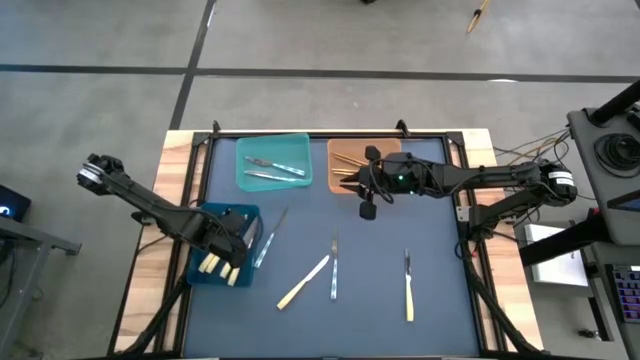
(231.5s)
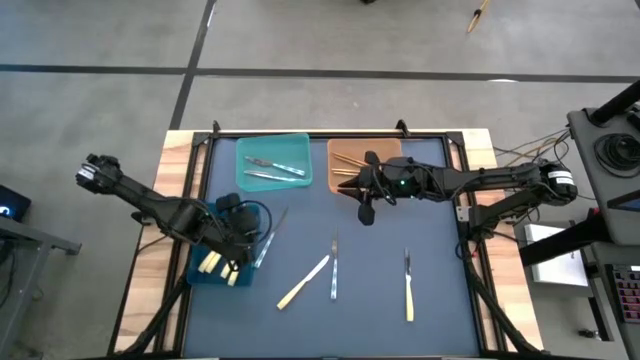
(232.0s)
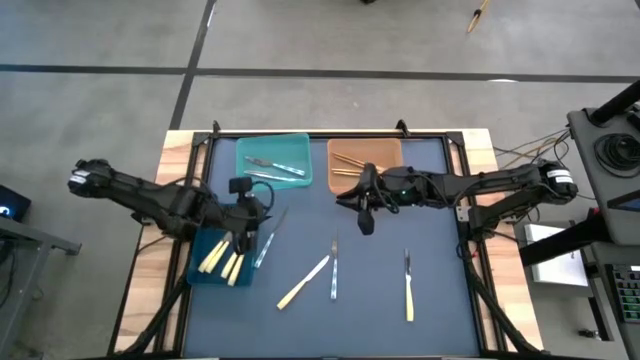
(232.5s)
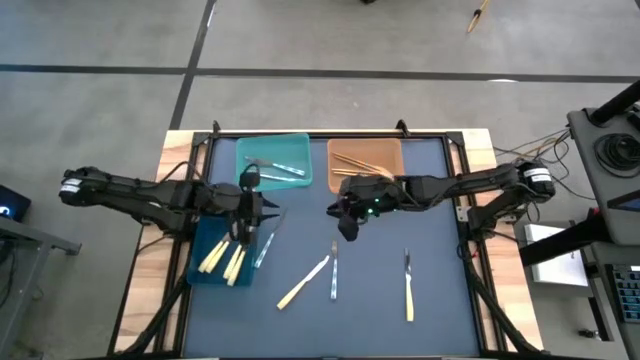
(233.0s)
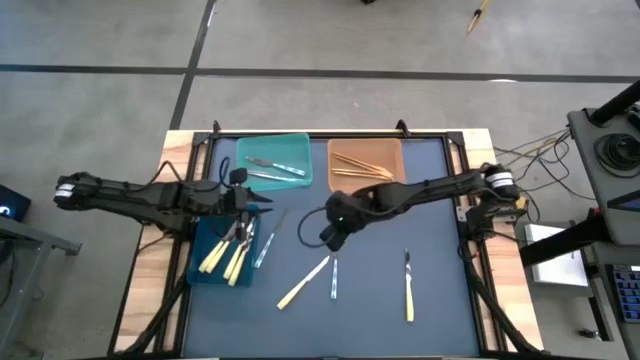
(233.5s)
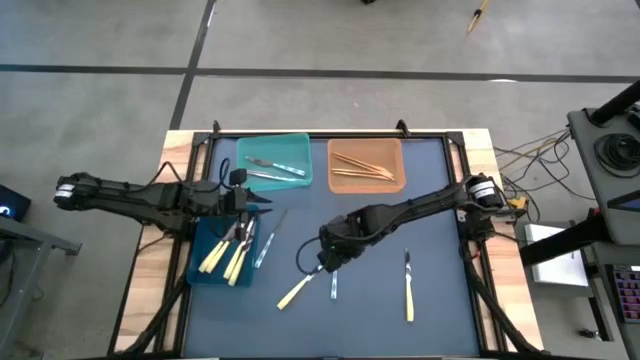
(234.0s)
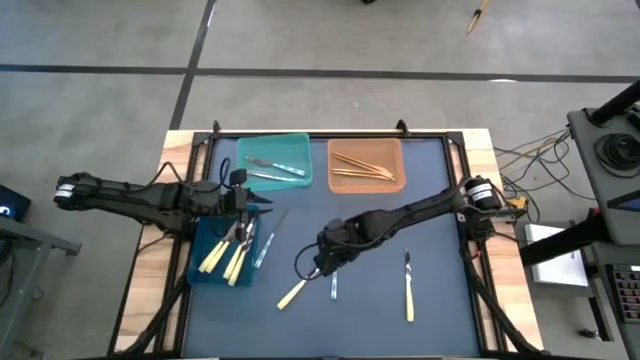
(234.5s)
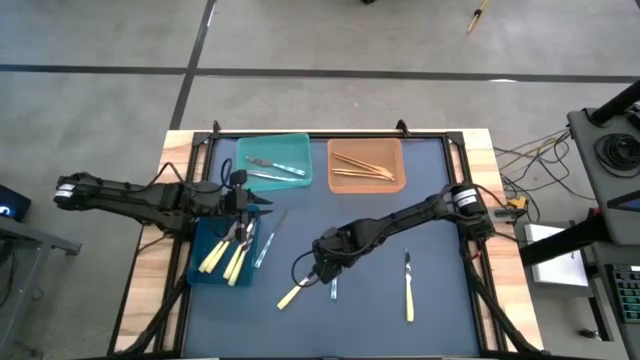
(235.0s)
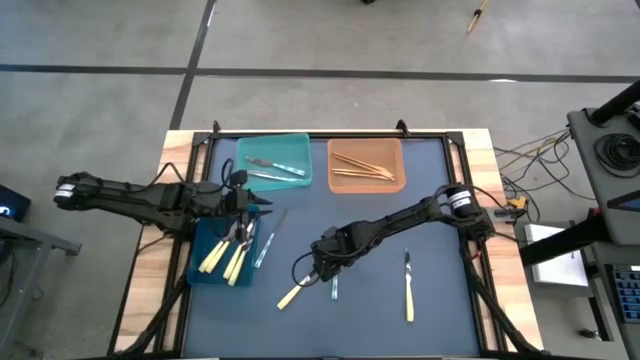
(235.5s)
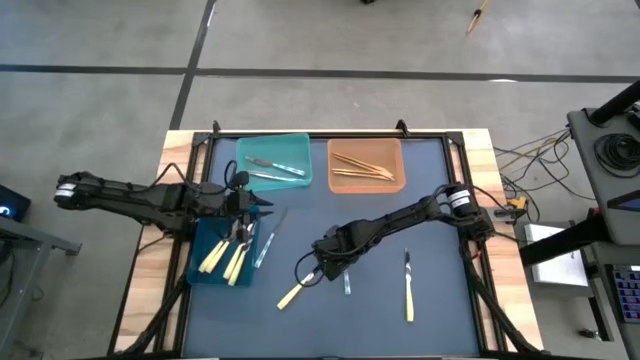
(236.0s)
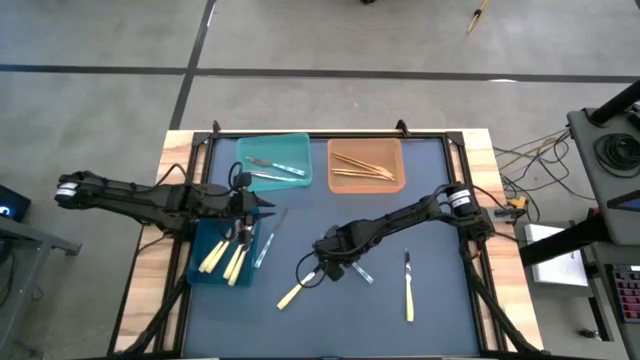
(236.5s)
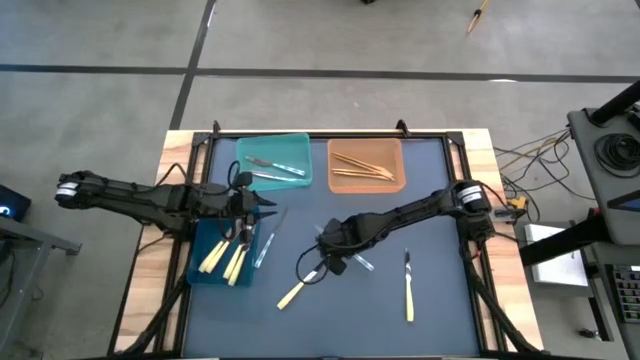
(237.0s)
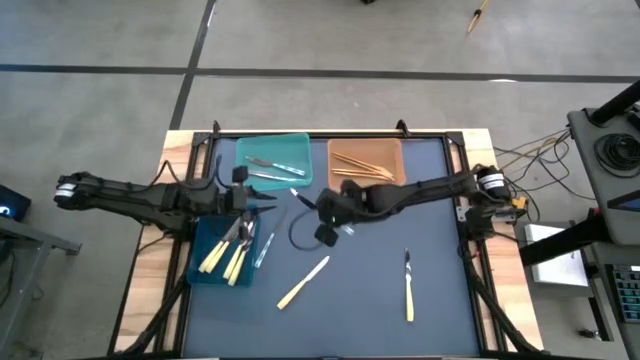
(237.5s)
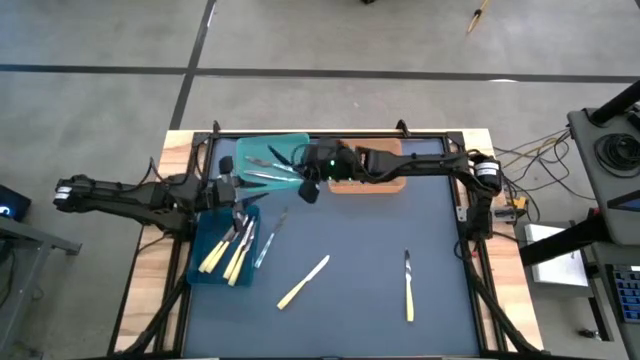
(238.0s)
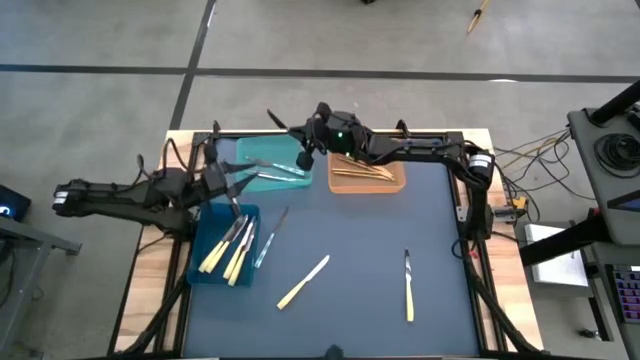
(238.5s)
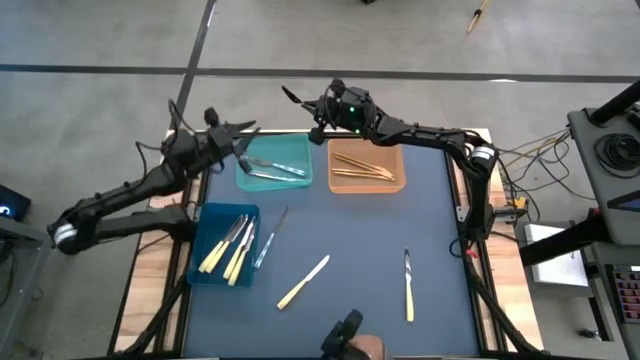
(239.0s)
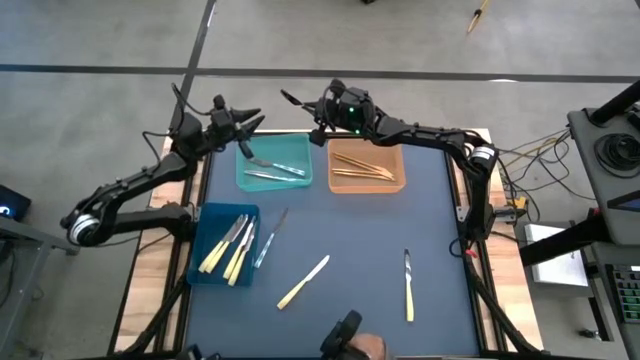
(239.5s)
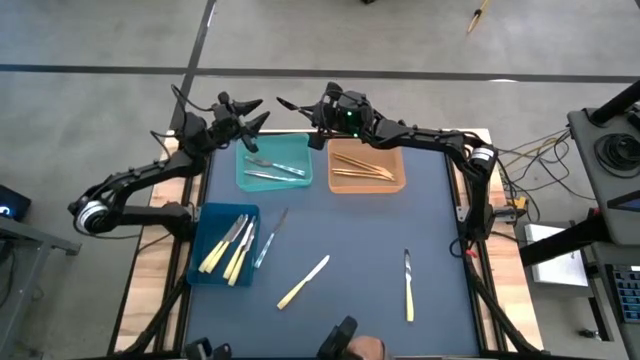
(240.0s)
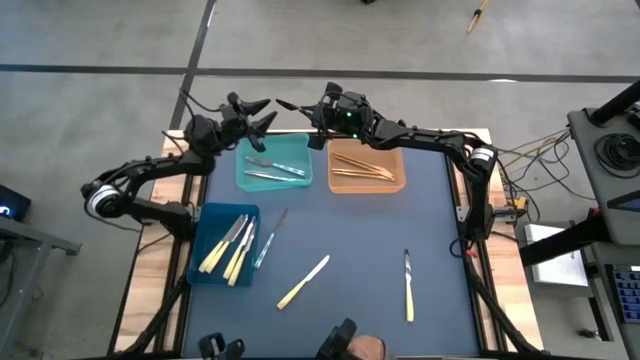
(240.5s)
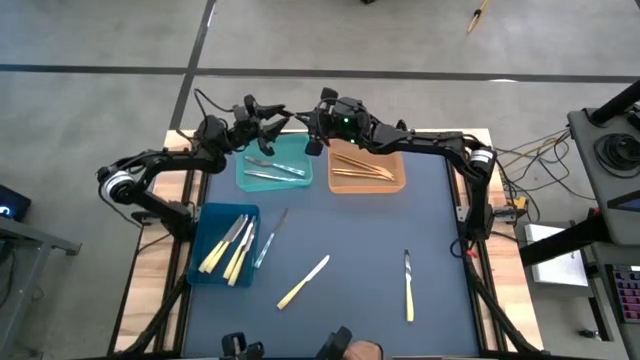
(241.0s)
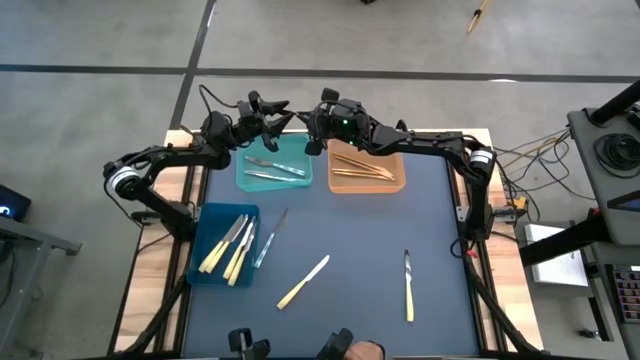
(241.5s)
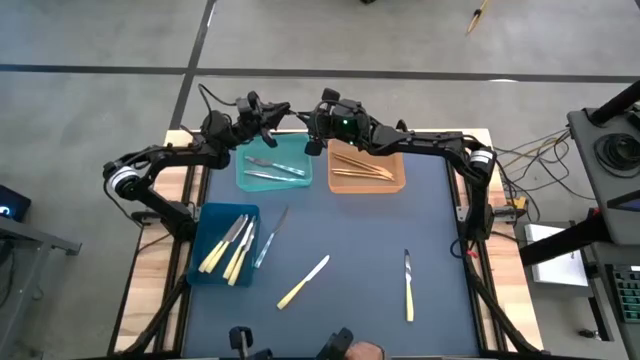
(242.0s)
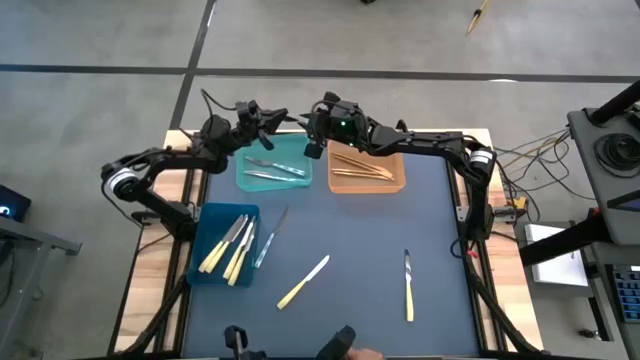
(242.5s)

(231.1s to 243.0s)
Task: Sort silverware by color (type)
Put the white knife into the light blue bin

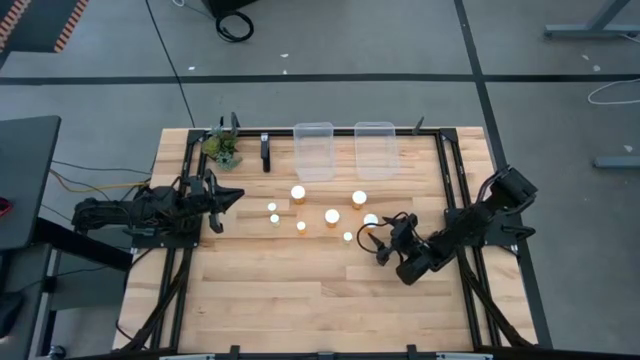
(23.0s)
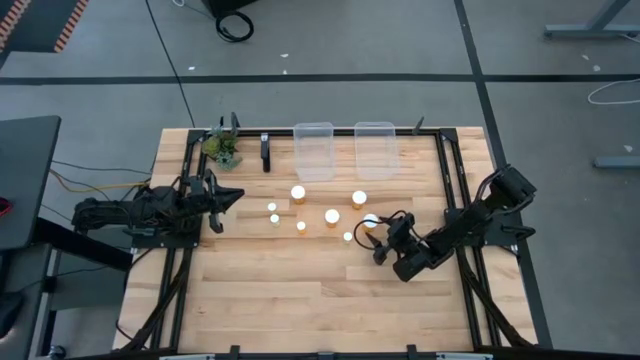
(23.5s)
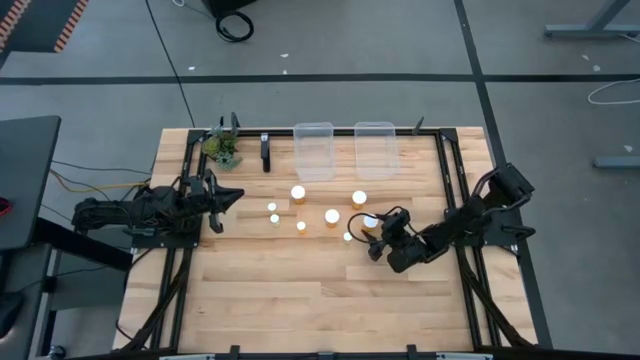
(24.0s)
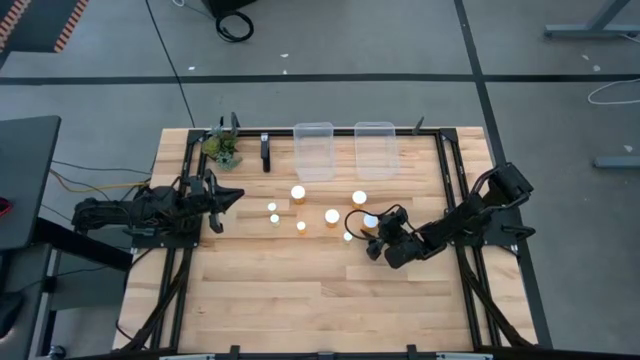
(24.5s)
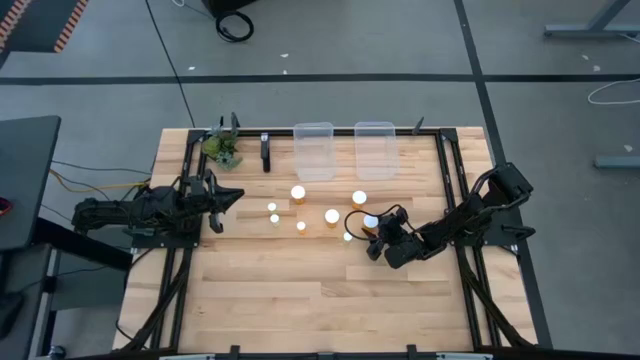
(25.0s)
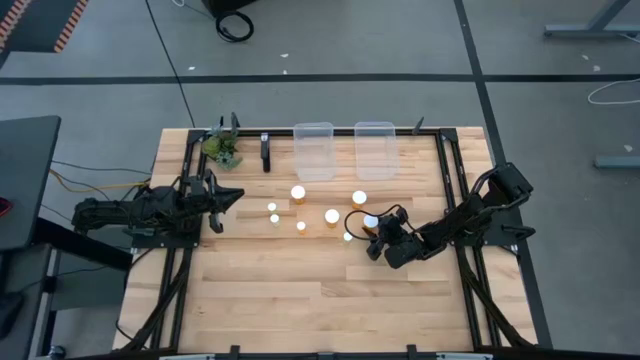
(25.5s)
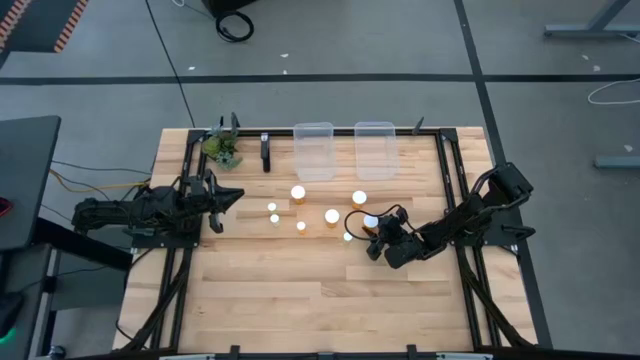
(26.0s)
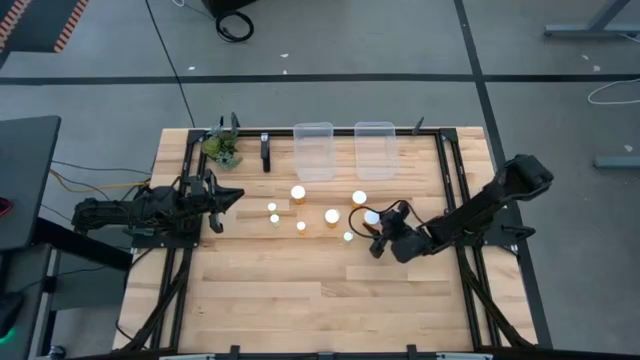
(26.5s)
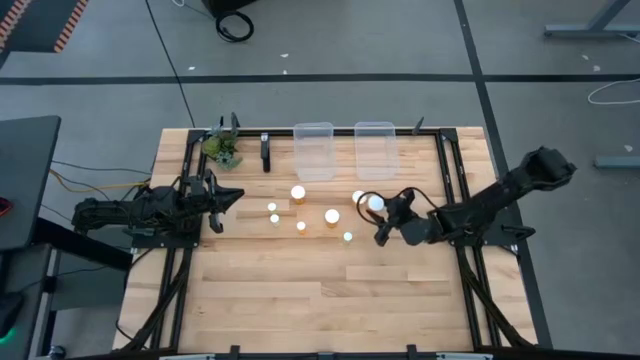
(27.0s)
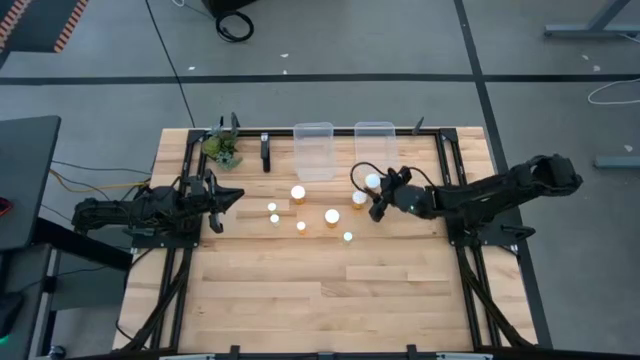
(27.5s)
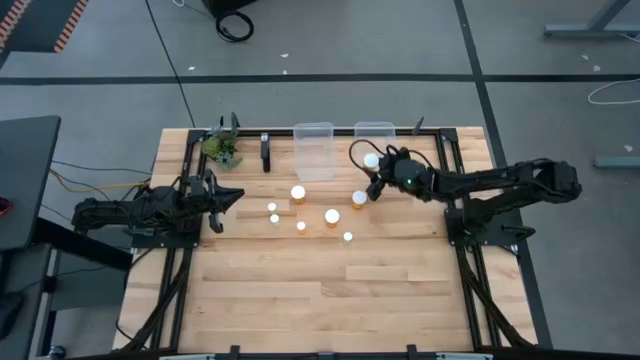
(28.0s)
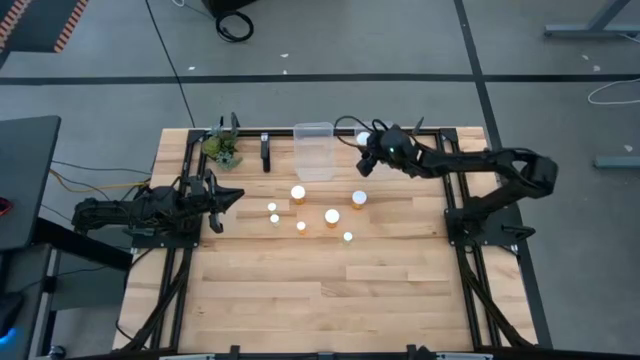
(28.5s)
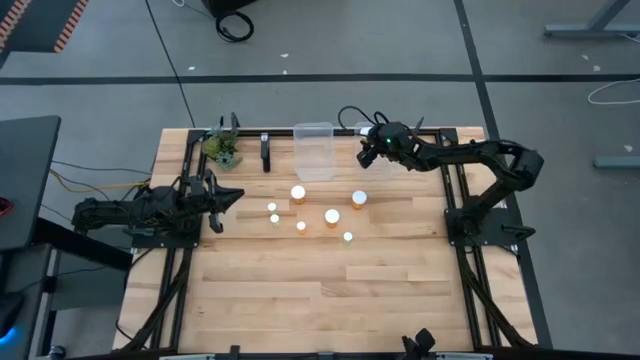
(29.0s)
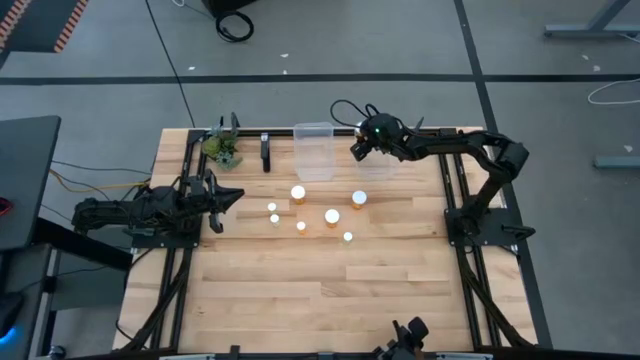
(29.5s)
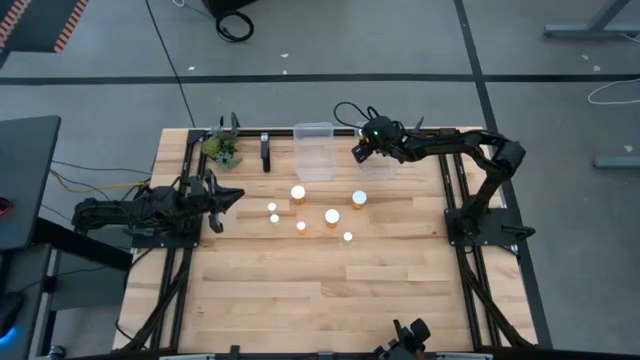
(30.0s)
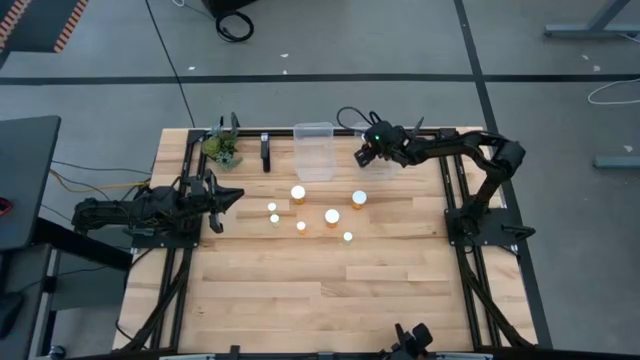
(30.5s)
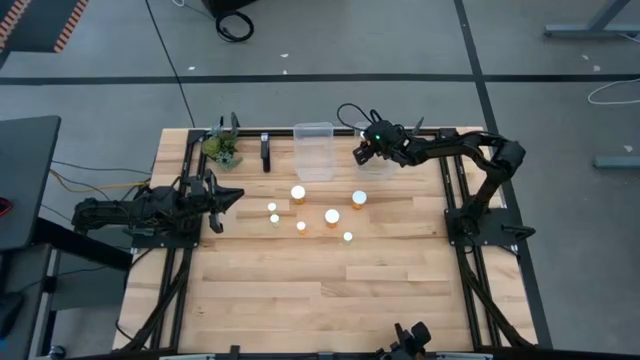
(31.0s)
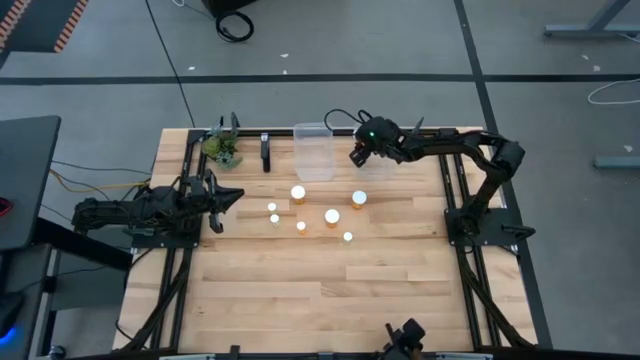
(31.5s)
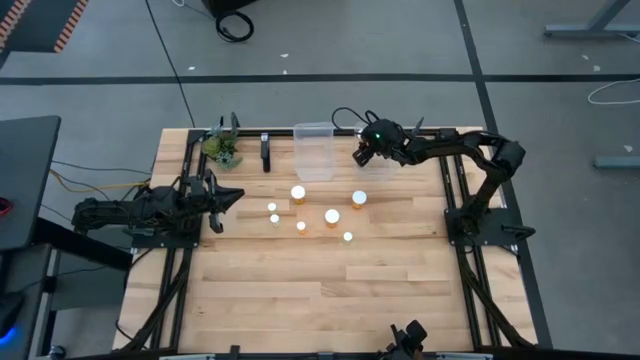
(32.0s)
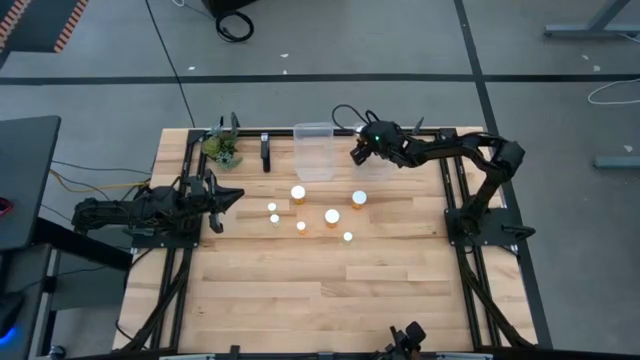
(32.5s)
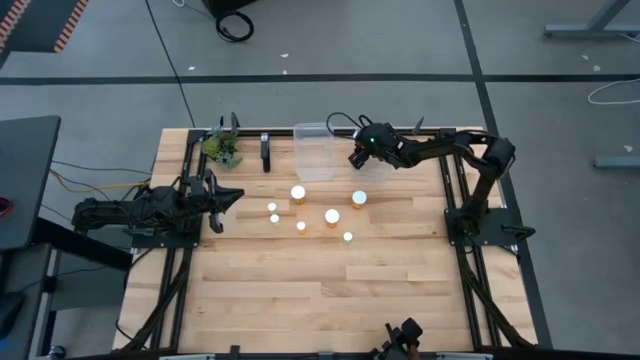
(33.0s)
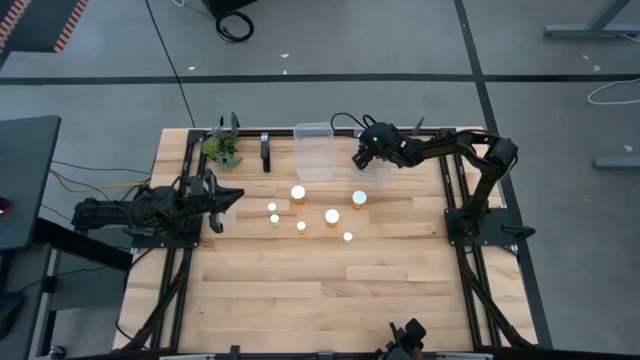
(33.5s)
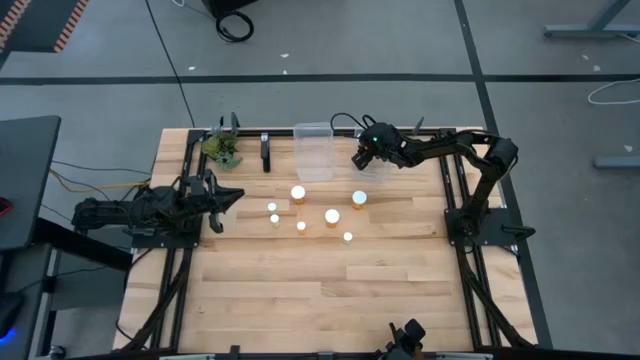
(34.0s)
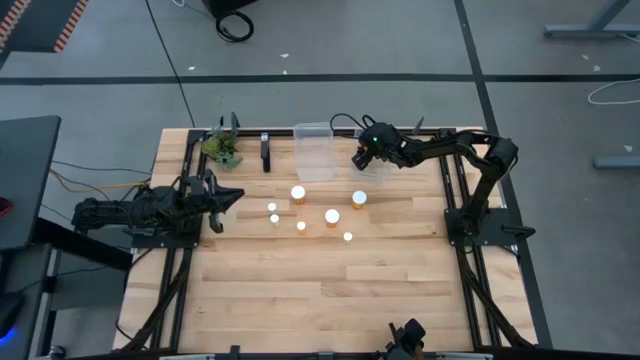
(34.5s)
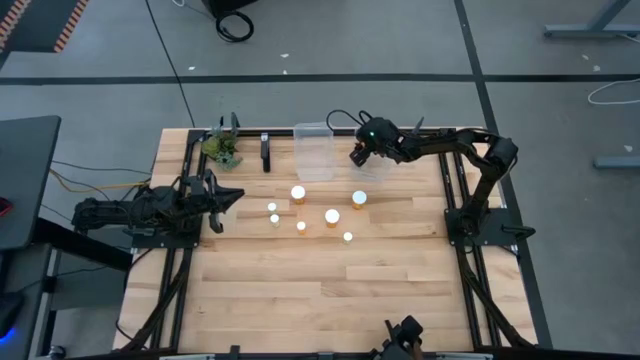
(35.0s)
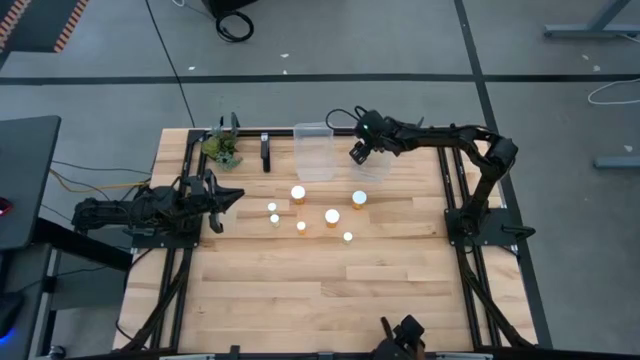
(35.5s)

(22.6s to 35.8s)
Task: Pick and place medicine bottles into bin by pill shape (circle, oval)
Put the bottom right big orange pill into the right transparent bin
